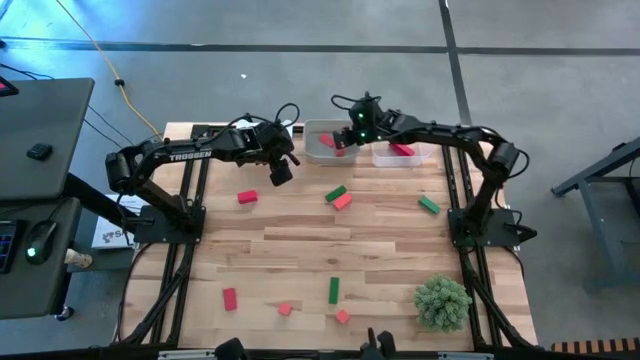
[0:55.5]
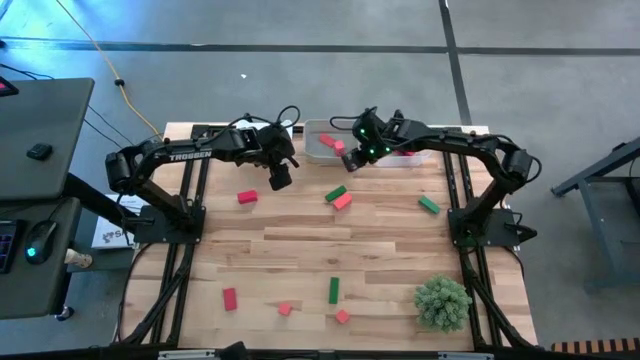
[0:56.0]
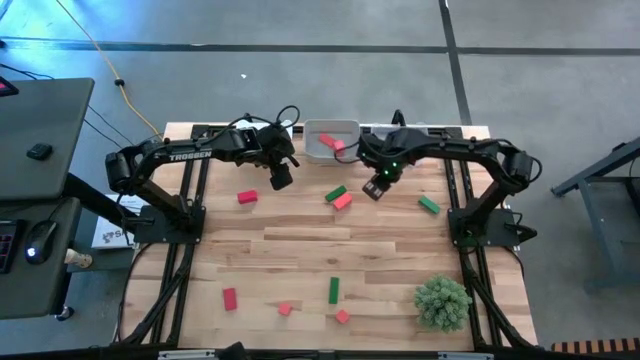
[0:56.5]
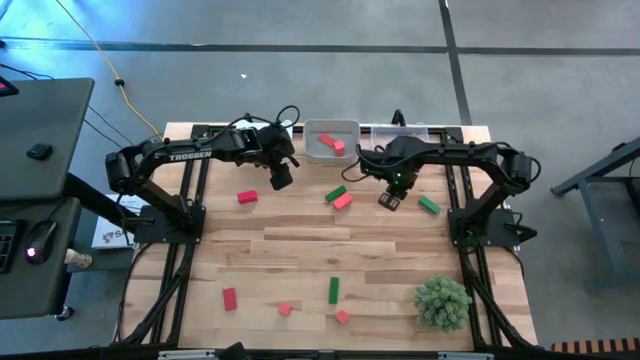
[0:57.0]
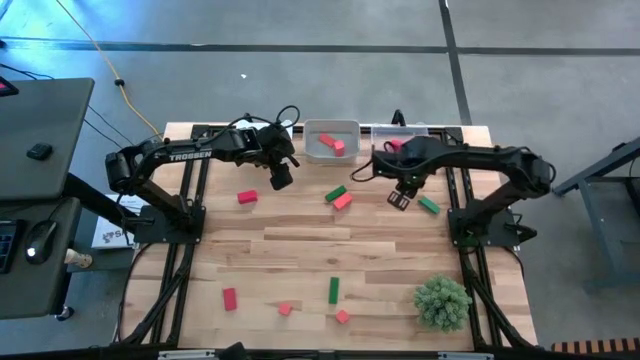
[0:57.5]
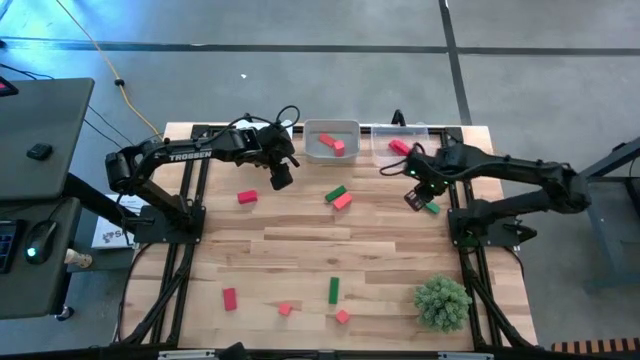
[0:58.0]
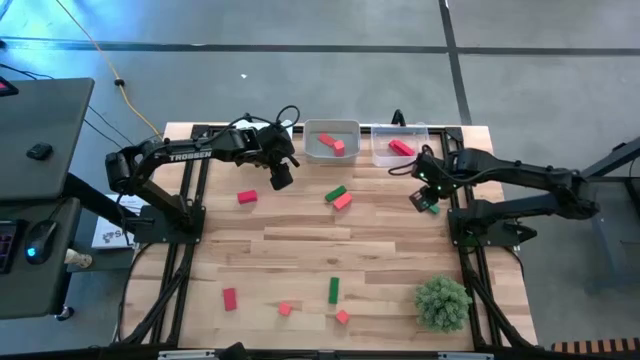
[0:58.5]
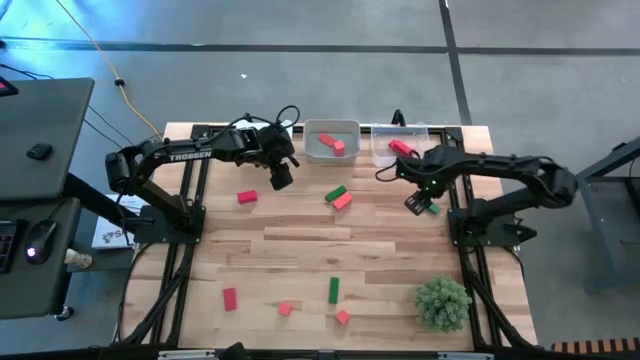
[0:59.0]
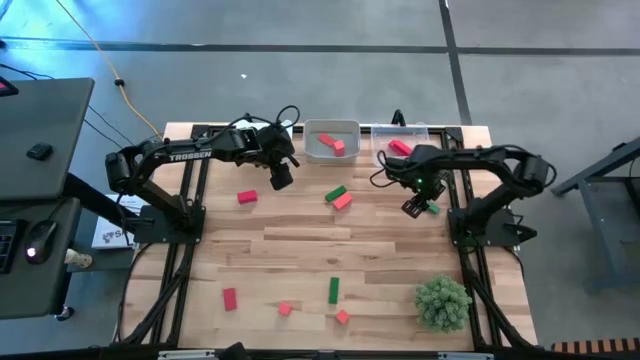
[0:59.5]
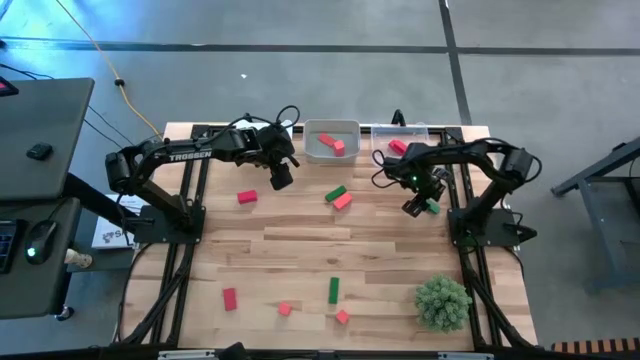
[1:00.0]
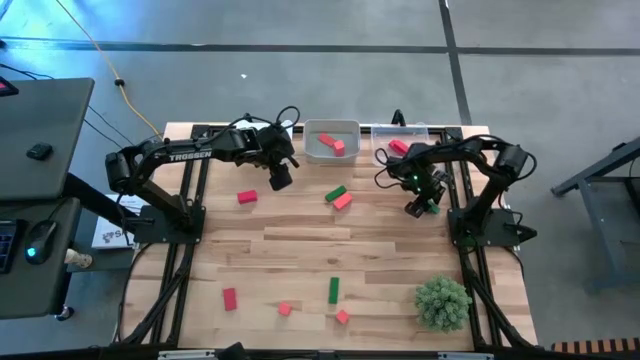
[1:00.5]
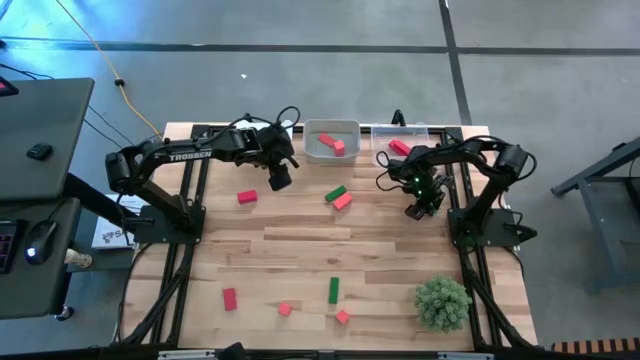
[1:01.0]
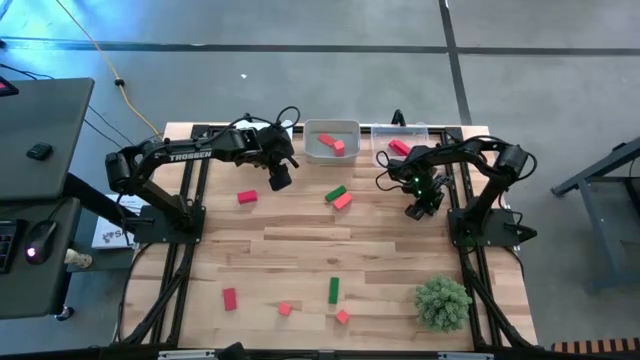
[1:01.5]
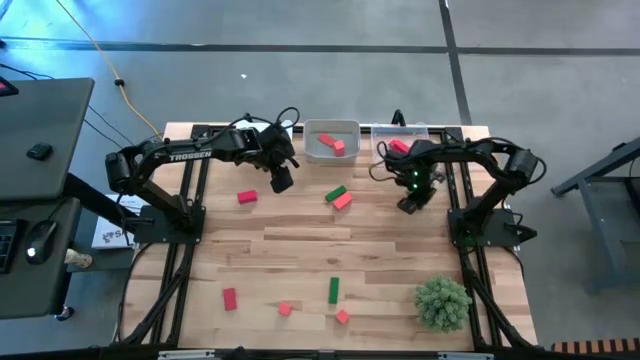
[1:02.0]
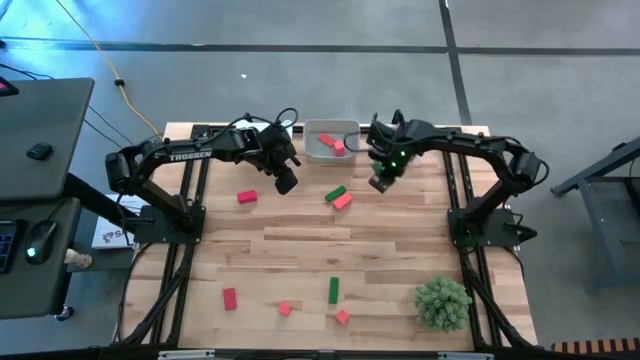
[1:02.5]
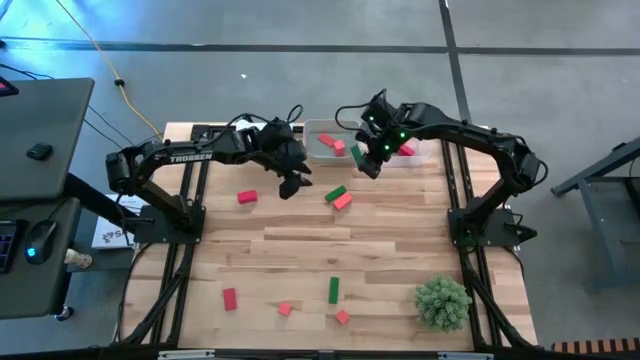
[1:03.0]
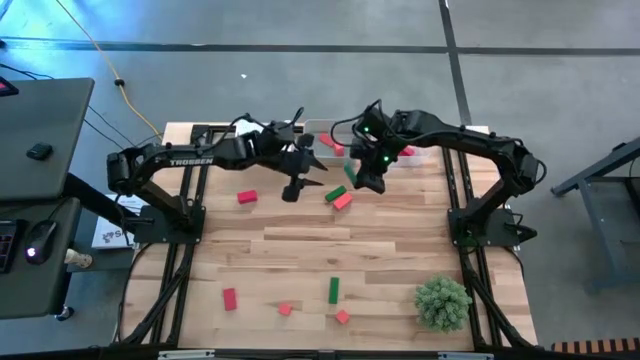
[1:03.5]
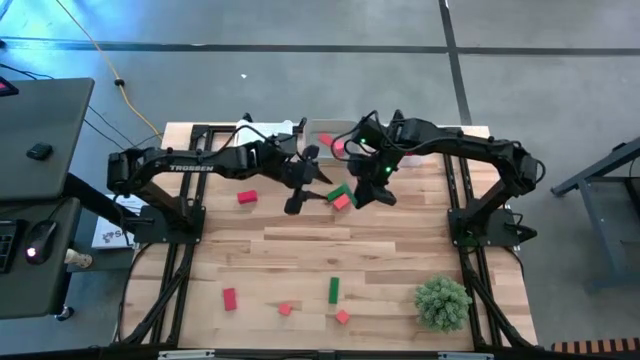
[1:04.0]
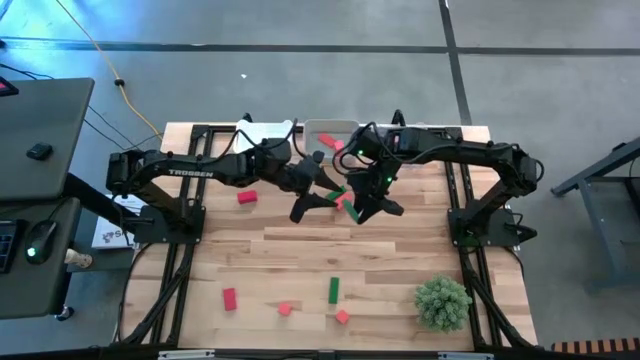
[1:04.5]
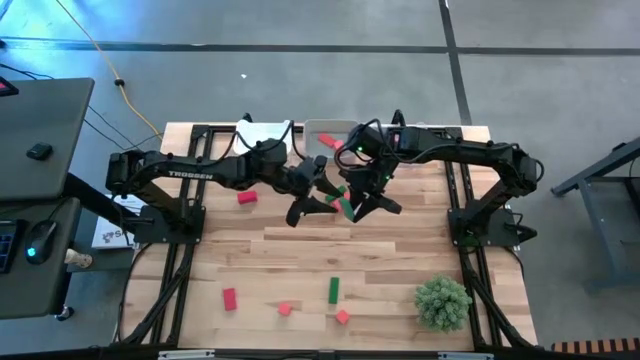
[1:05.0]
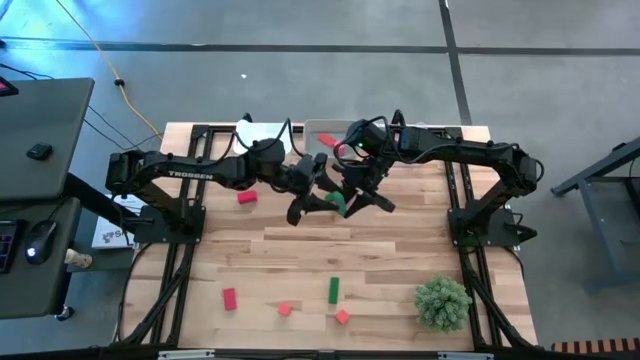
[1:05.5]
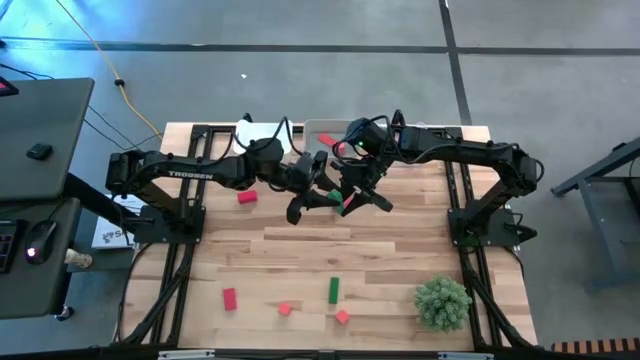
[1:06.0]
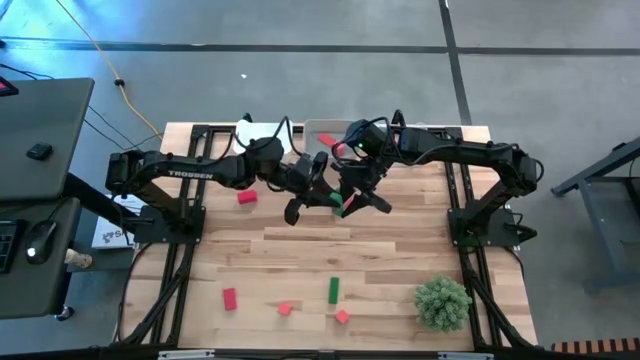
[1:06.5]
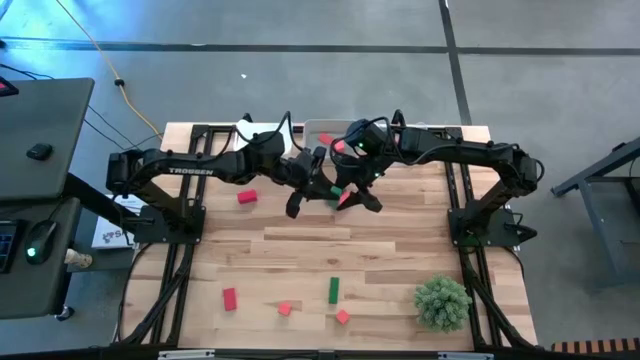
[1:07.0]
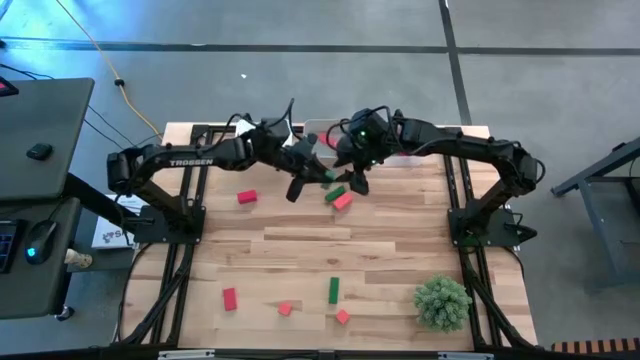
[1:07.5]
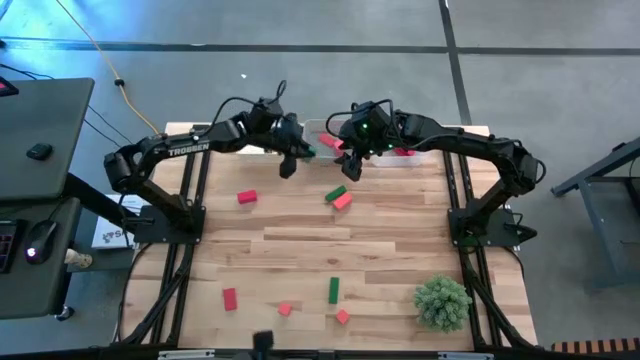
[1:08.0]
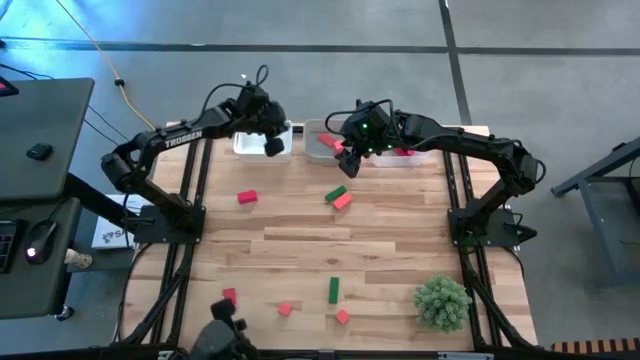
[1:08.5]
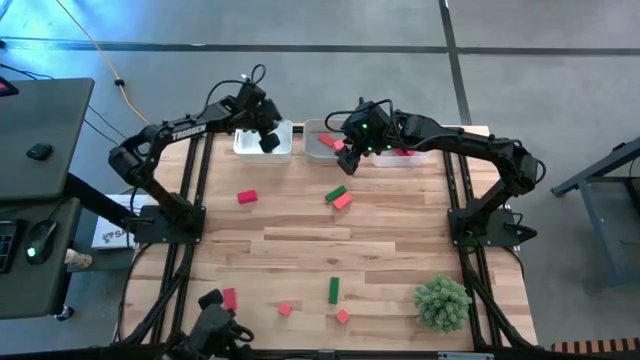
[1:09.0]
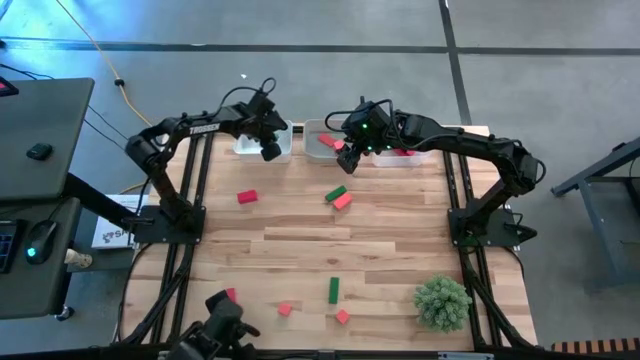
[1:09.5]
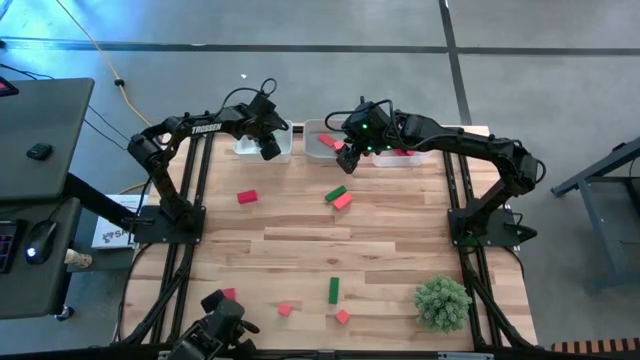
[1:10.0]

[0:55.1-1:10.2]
Task: Sort & place blocks by color
Put the green wooden block into the white bin

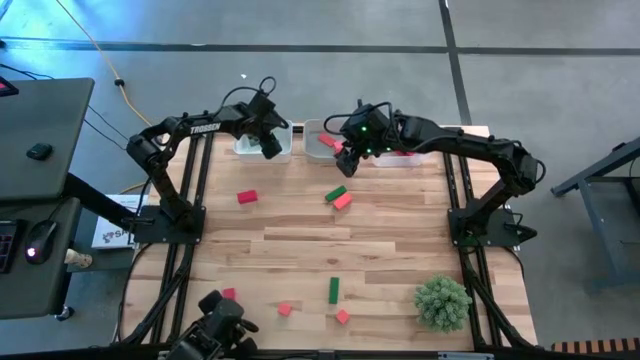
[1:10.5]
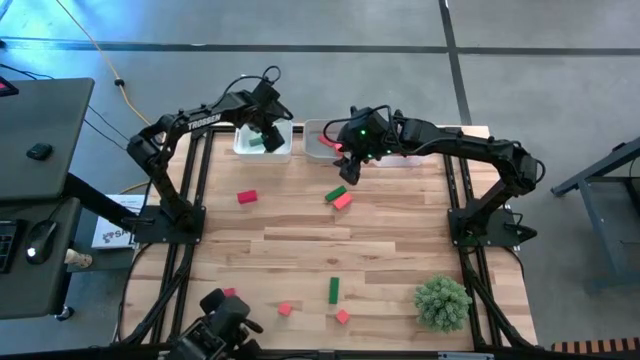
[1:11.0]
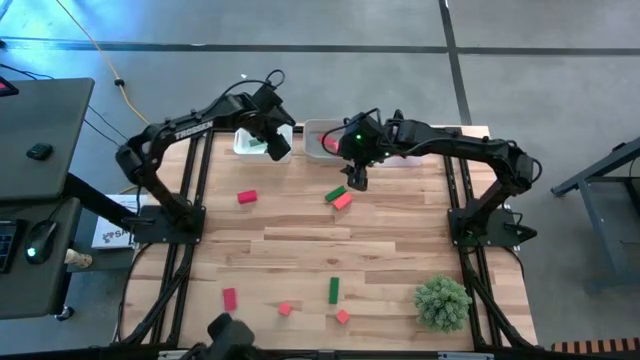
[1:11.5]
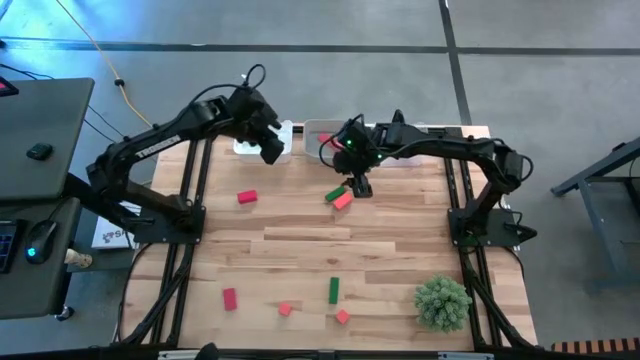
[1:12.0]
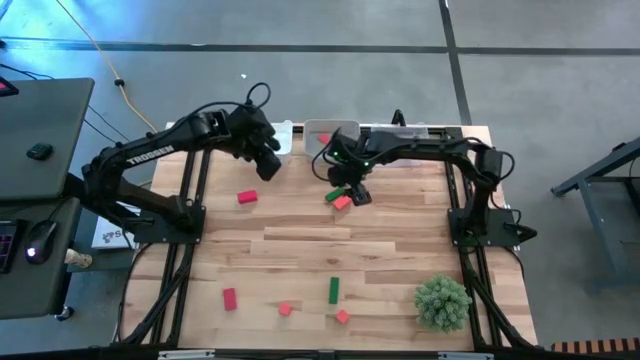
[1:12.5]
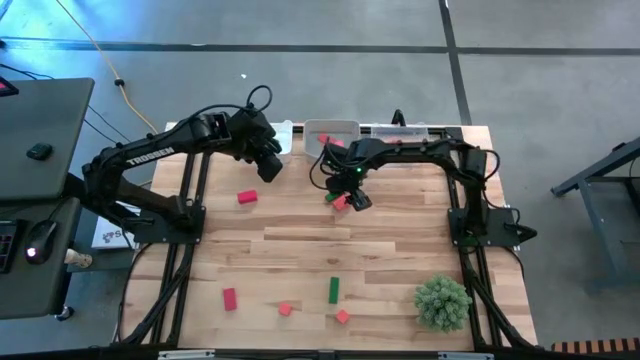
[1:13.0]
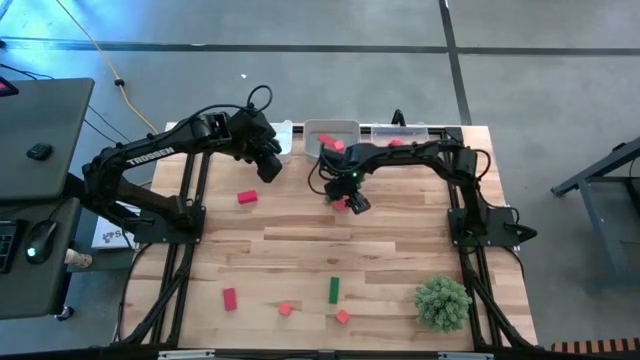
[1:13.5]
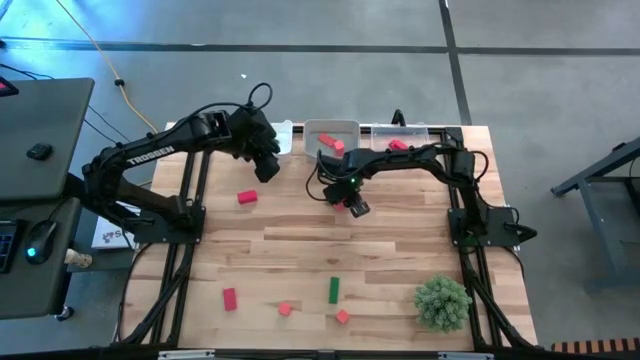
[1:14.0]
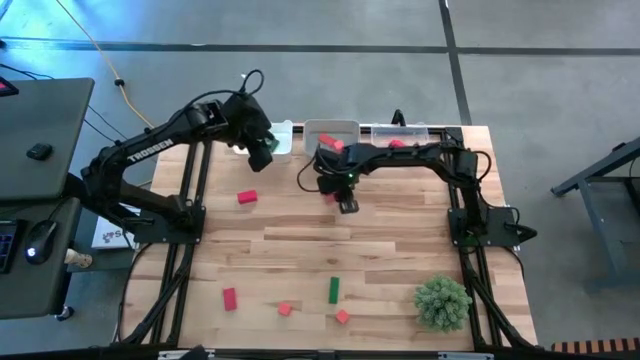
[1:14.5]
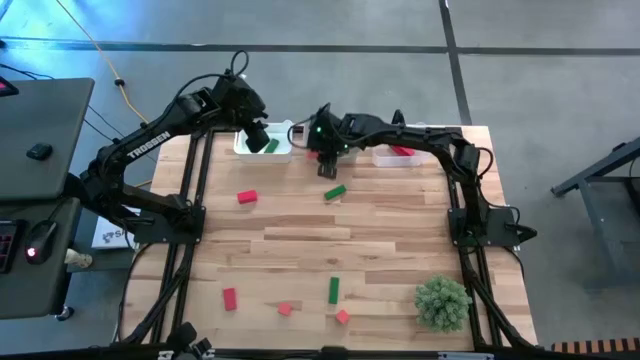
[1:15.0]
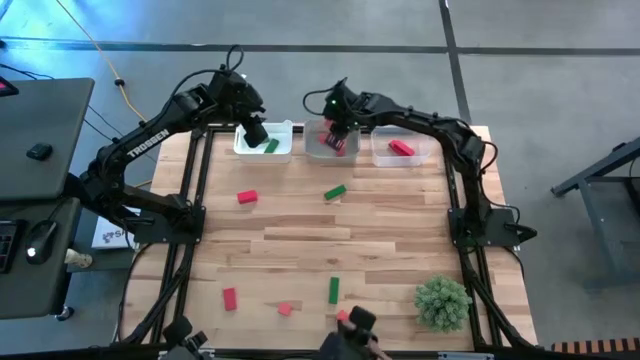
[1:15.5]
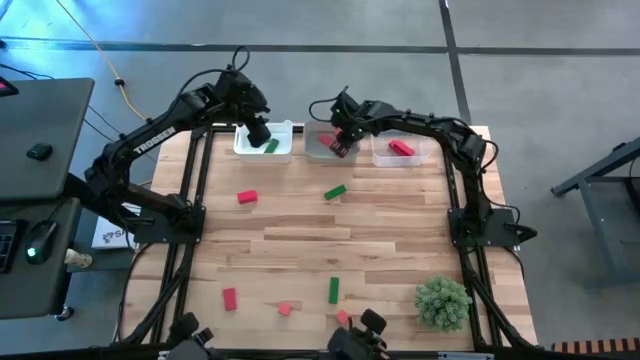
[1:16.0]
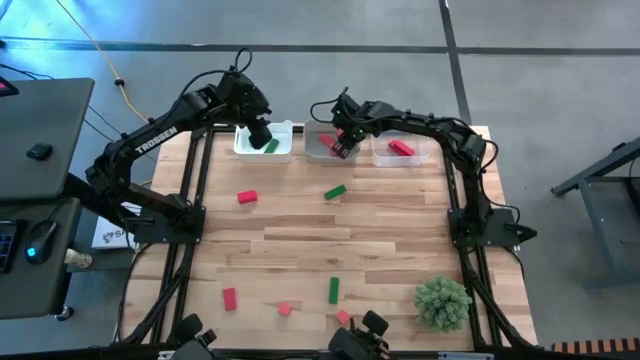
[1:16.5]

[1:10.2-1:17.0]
Put the orange wooden block into the gray bin

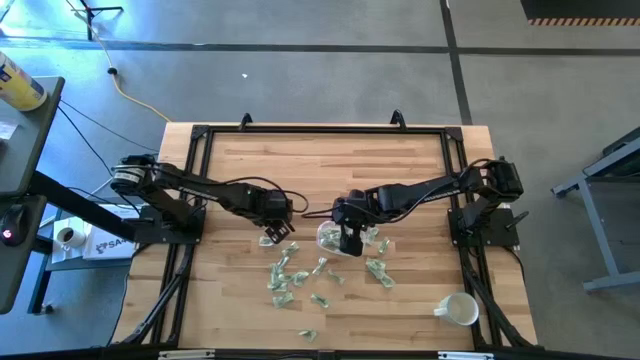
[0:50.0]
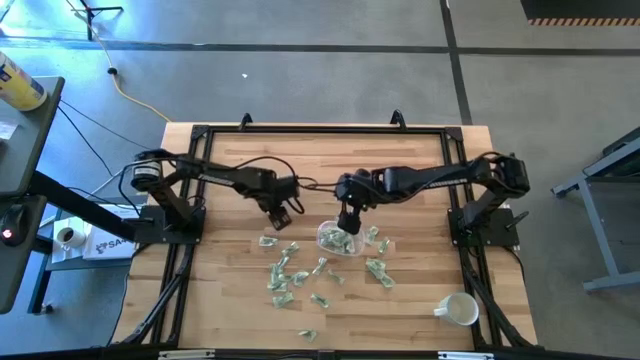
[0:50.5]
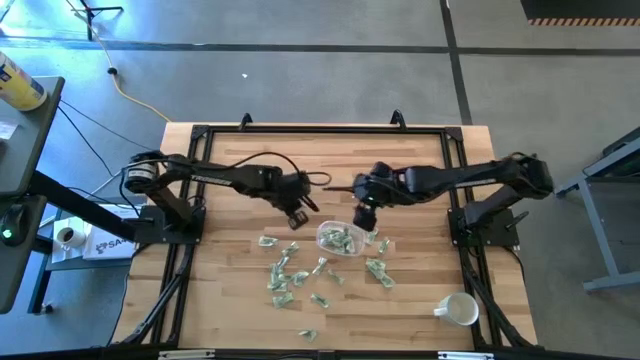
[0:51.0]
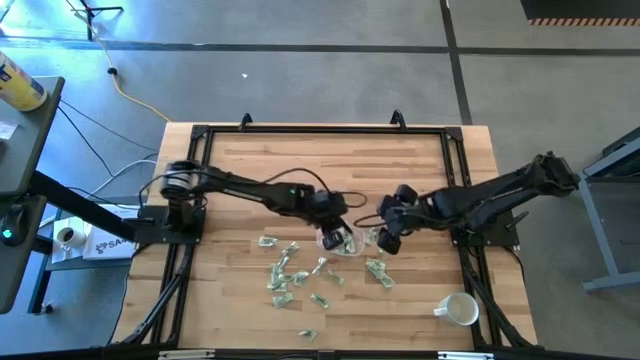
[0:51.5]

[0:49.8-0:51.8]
Task: Pick and place Stevia / Truvia into bins
Put the green stevia packet into the transparent container
